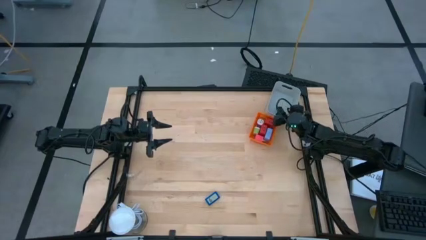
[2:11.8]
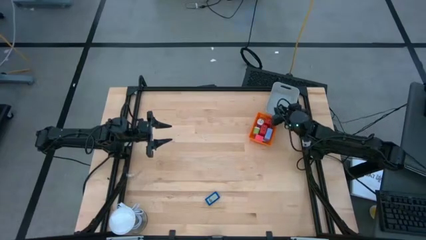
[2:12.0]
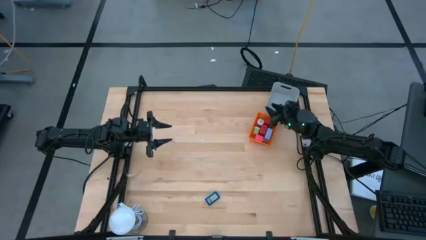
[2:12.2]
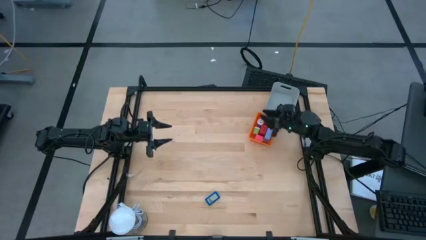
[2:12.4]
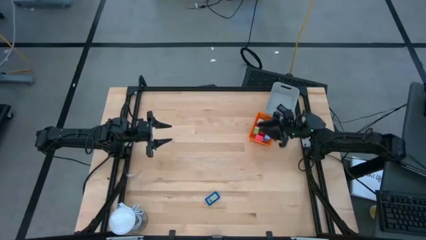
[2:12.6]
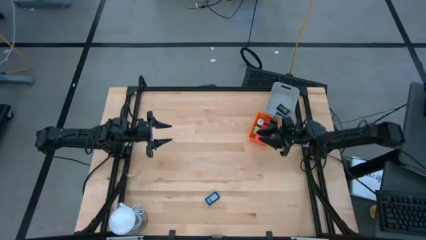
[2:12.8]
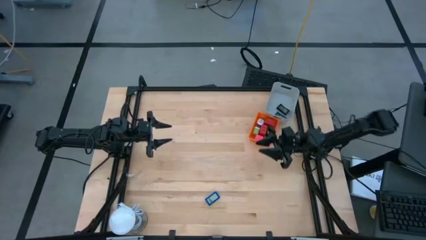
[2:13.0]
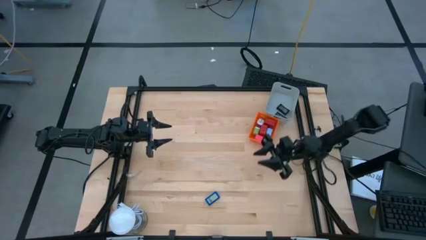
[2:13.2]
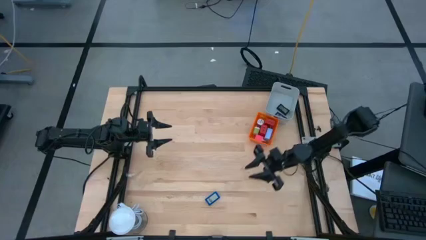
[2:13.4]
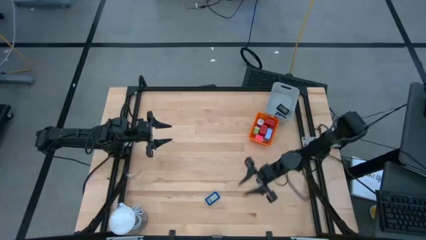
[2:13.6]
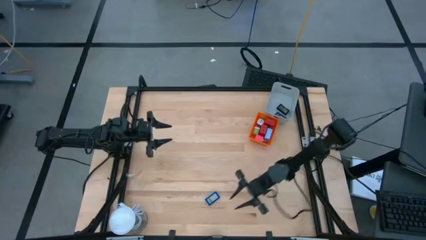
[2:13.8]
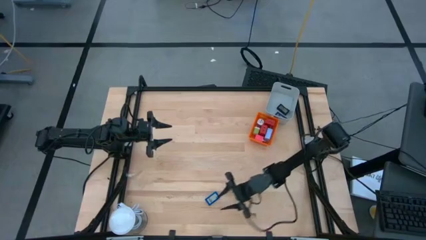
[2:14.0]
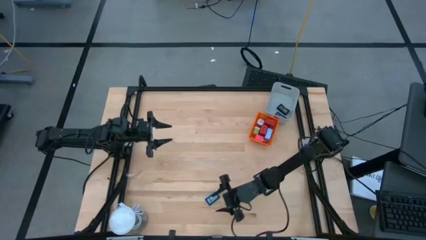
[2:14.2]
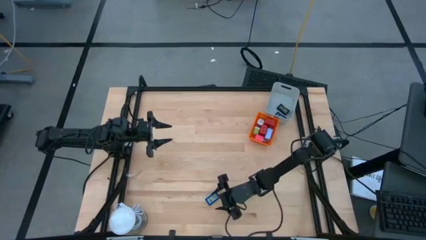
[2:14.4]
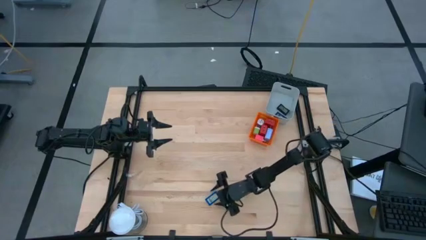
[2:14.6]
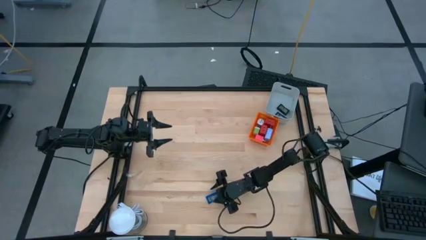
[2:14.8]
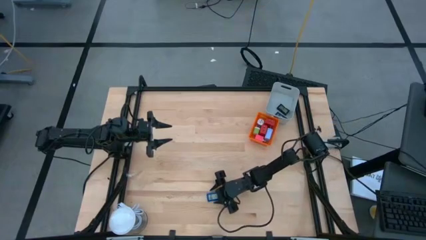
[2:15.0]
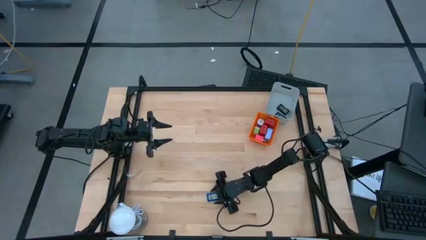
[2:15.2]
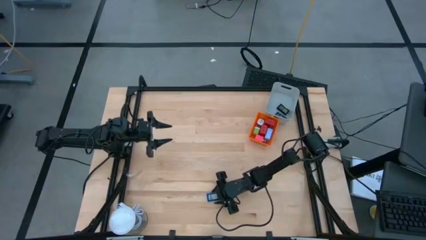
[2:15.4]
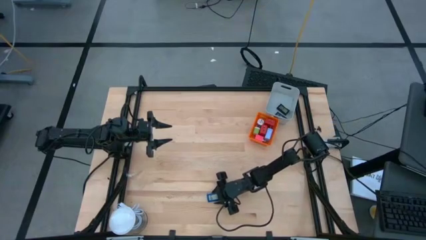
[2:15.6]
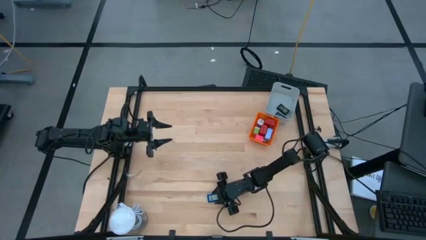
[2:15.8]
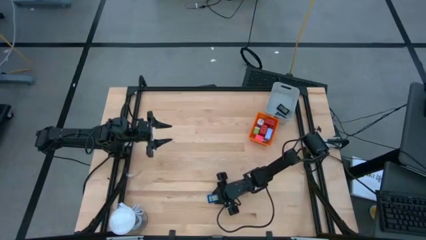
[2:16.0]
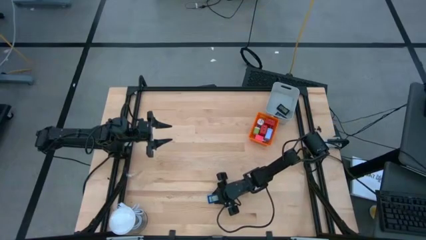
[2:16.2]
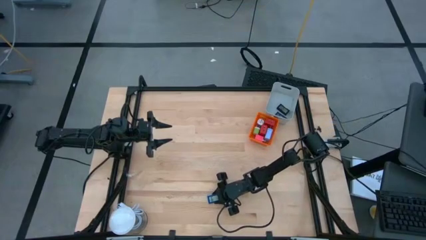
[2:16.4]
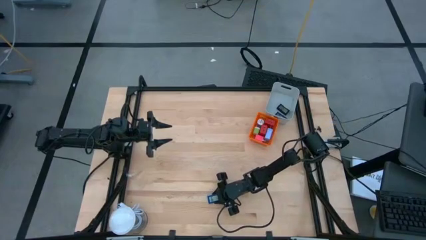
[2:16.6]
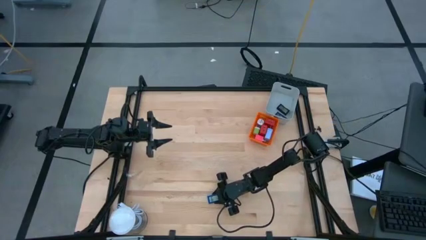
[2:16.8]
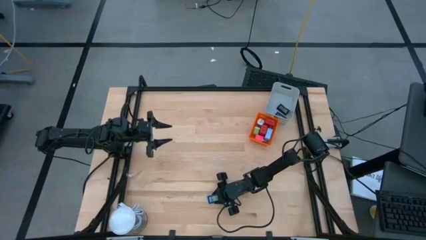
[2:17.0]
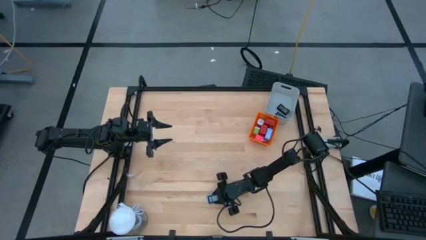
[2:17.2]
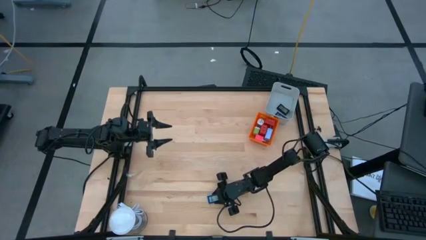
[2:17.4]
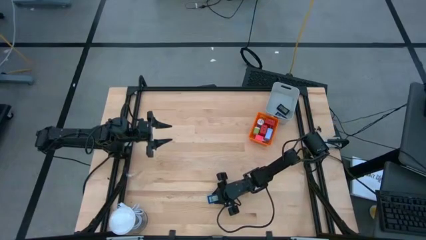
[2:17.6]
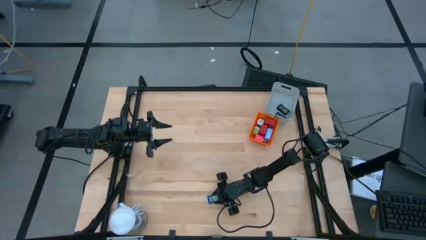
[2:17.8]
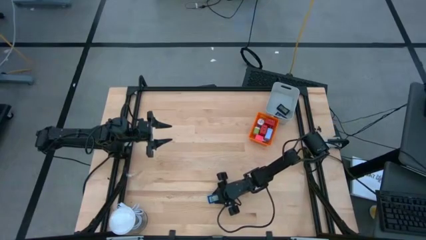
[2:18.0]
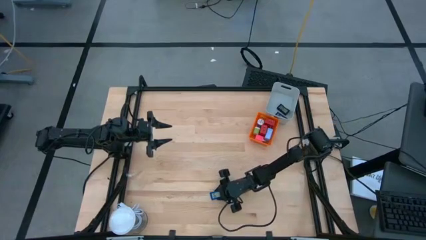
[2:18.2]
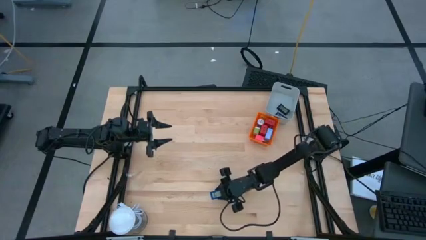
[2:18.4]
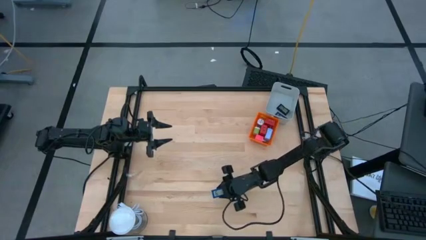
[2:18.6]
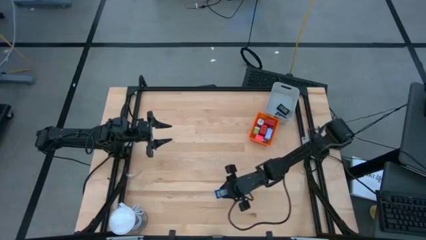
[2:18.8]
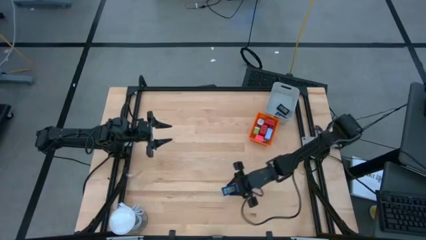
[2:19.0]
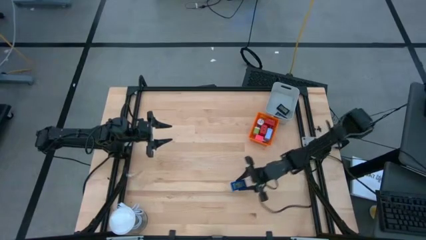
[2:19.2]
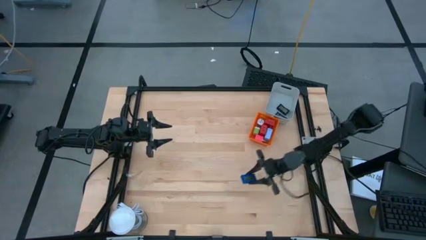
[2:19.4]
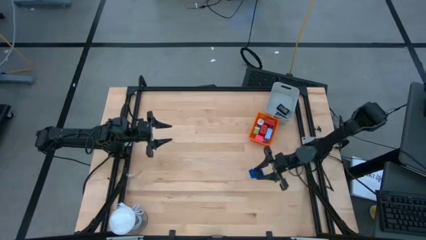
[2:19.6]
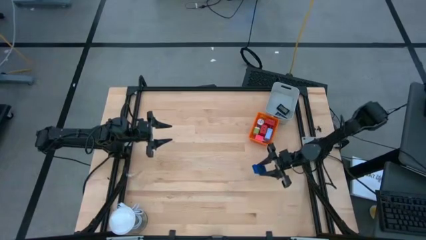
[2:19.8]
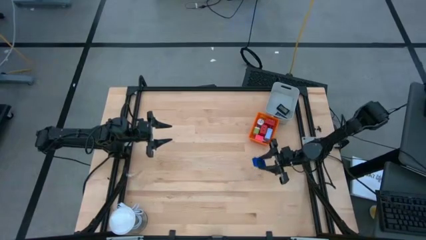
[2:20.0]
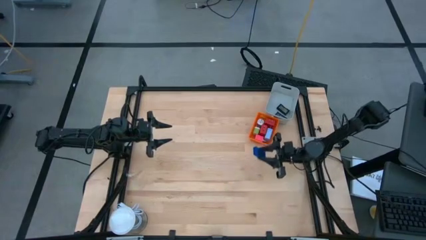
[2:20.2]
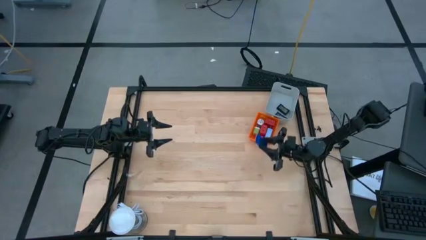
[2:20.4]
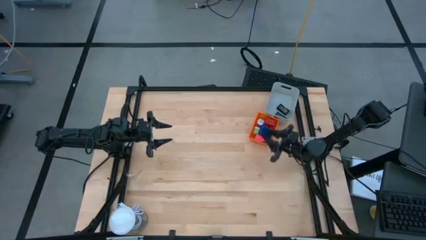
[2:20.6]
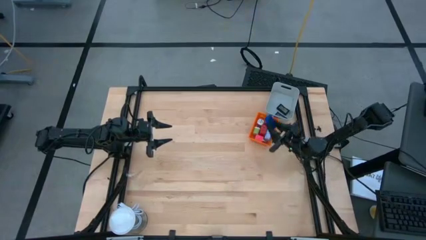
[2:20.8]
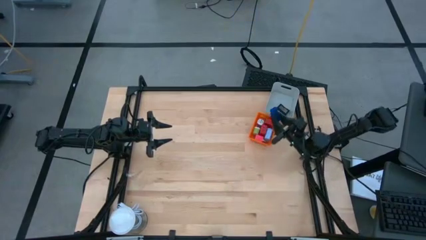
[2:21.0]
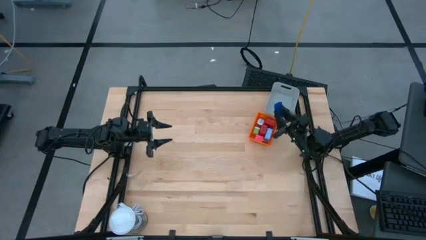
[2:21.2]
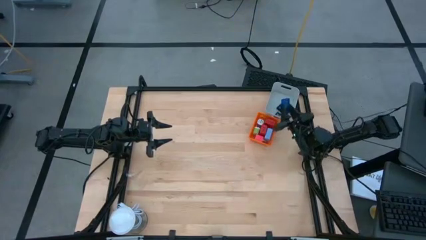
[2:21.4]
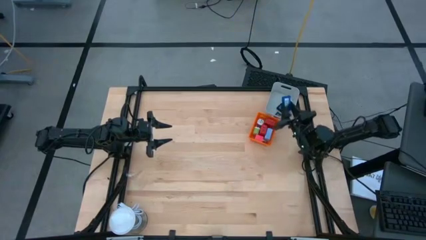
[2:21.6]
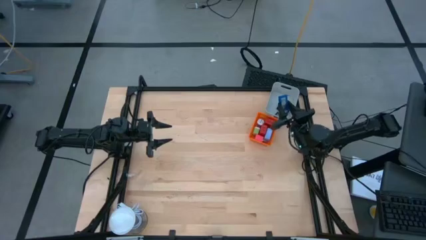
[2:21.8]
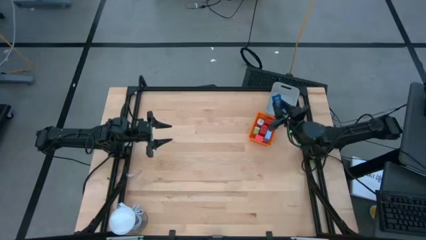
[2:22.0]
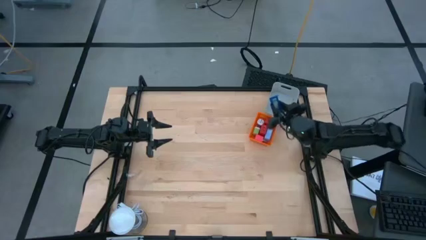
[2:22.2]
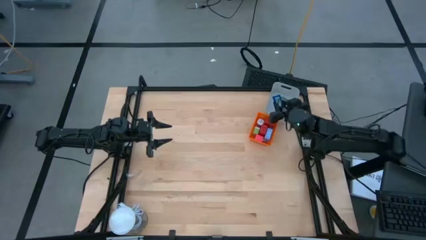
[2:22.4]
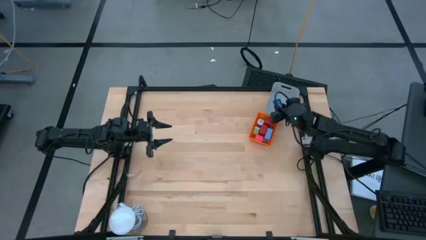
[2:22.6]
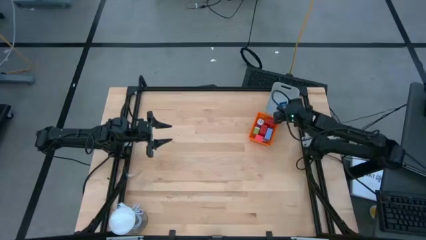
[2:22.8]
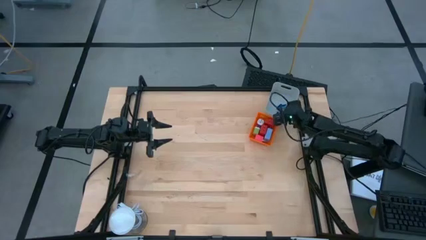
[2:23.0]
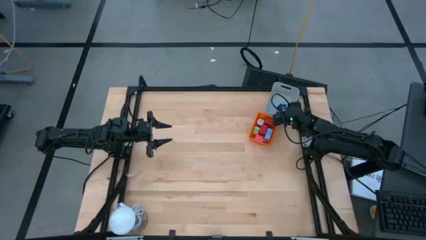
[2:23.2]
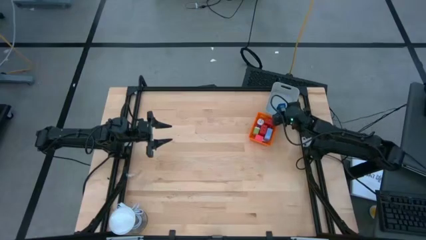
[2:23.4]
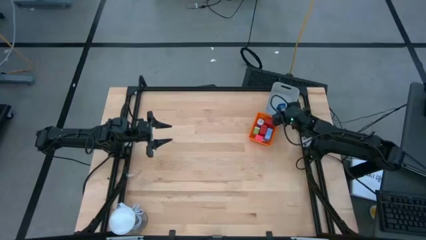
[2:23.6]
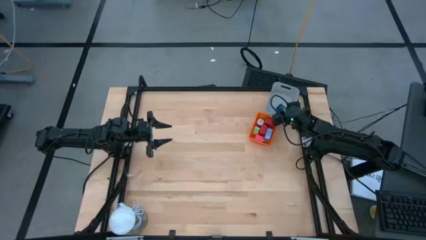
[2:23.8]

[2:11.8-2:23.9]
Task: Pick & Place Office items
Put the blue digital clock into the gray bin

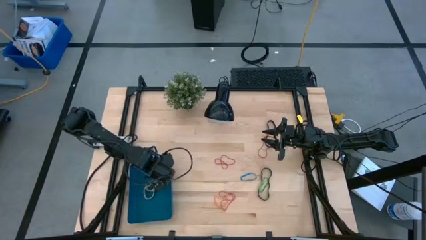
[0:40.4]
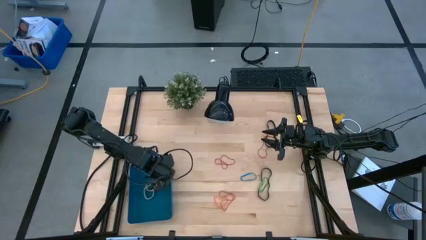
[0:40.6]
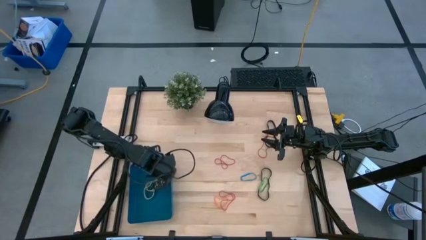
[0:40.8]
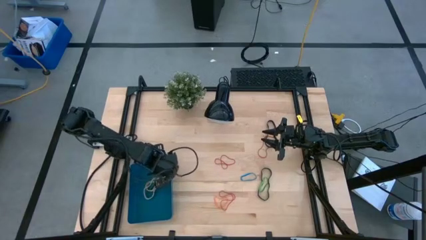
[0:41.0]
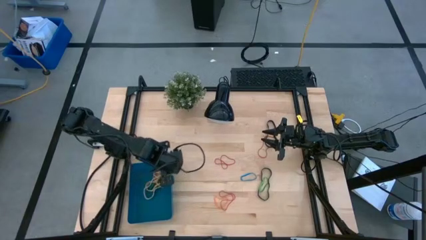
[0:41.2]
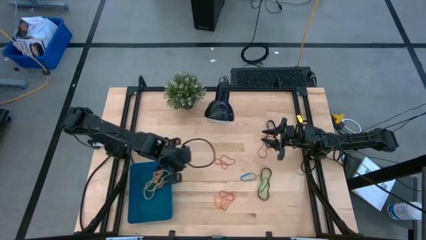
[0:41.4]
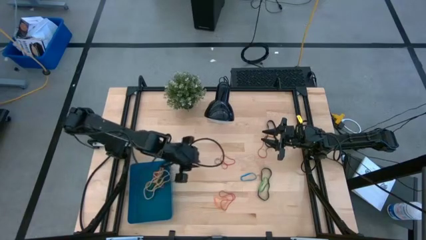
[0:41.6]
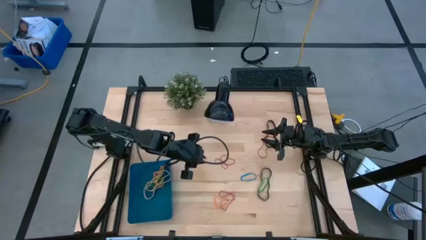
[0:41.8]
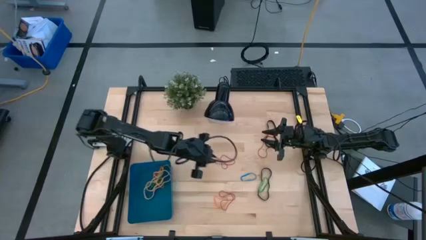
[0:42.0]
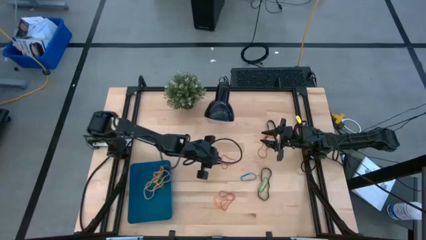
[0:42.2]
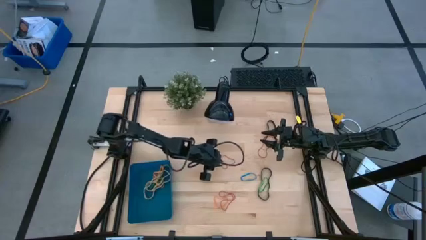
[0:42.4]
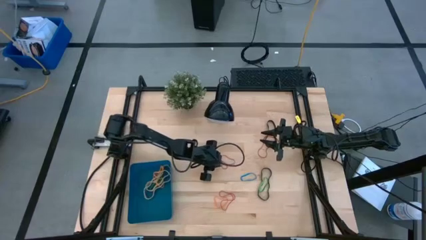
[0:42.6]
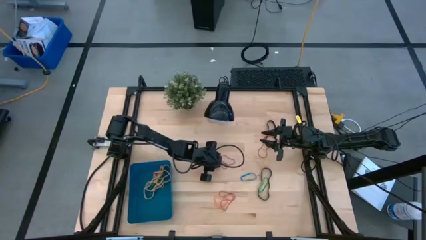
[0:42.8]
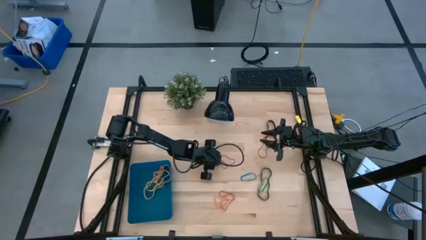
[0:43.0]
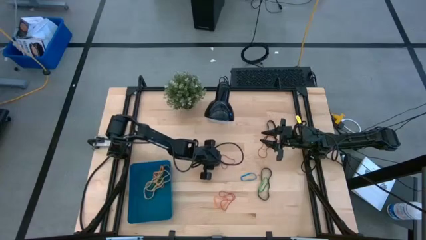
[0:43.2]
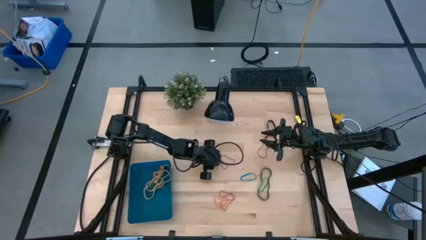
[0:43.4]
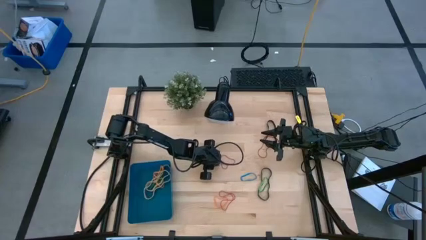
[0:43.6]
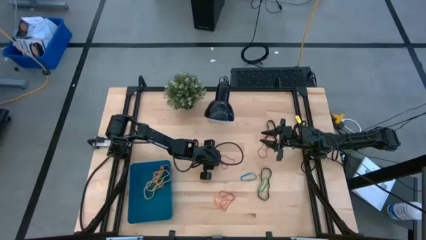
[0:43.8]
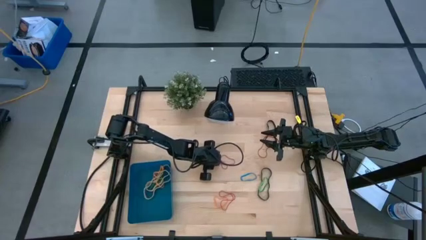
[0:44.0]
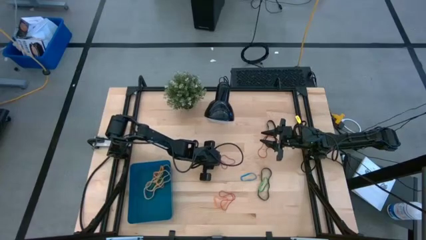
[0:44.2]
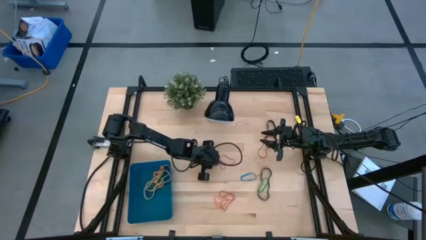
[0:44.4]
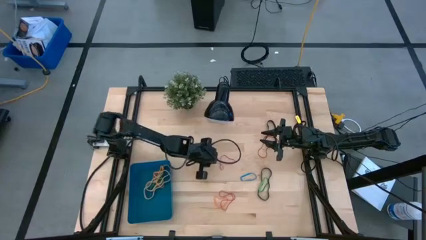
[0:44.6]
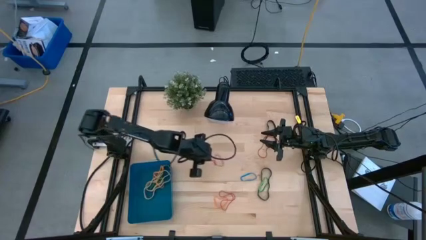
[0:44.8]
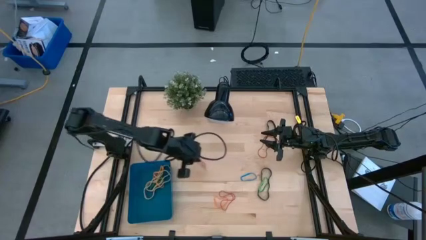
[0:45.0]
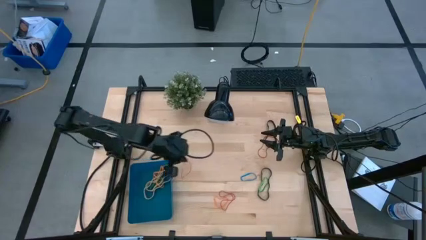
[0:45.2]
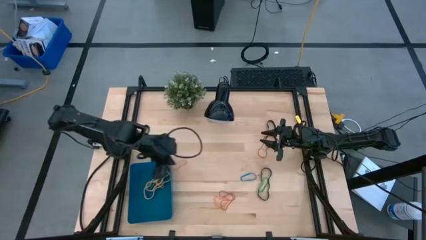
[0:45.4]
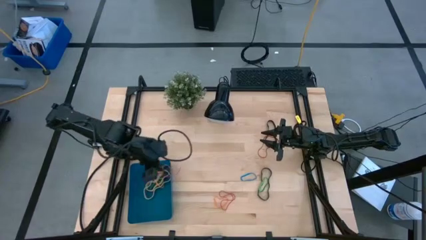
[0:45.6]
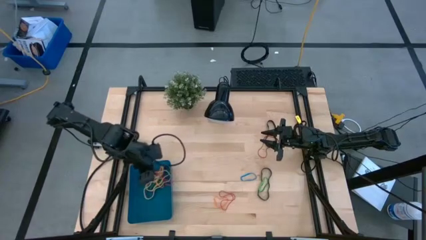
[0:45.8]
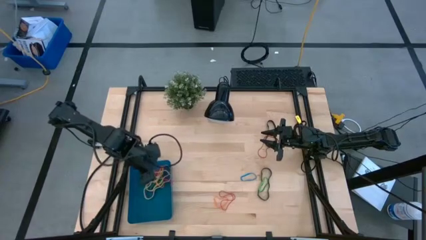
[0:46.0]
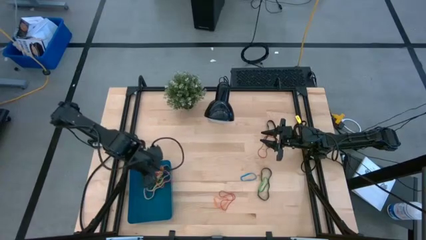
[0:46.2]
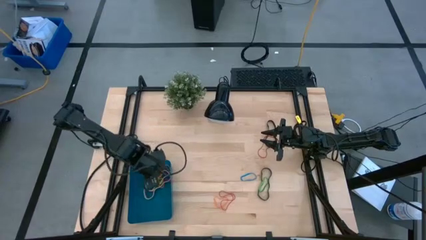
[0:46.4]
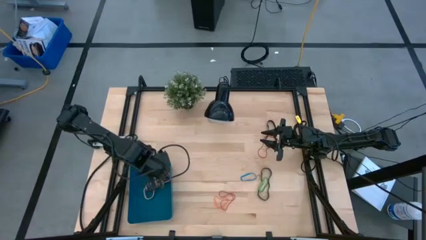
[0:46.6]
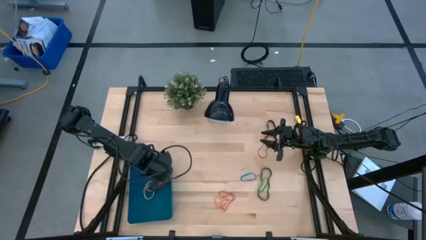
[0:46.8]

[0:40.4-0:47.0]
Task: Pick and place rubber bands into bin
Put the top left red rubber band into the blue bin
